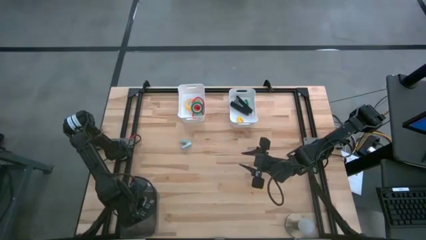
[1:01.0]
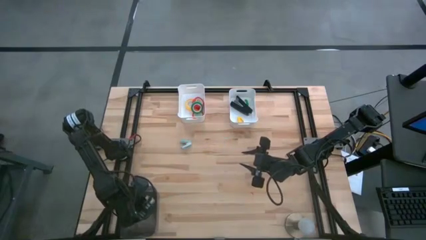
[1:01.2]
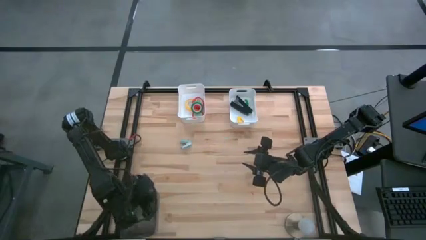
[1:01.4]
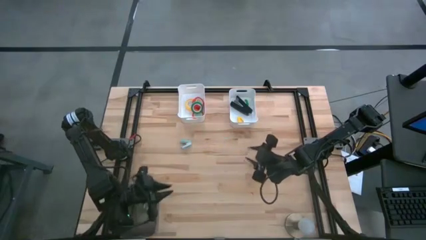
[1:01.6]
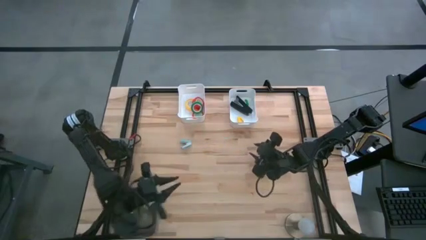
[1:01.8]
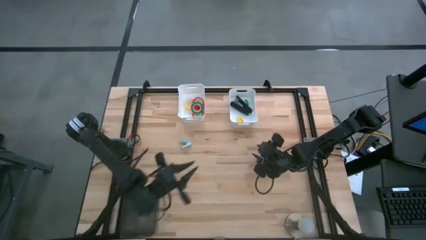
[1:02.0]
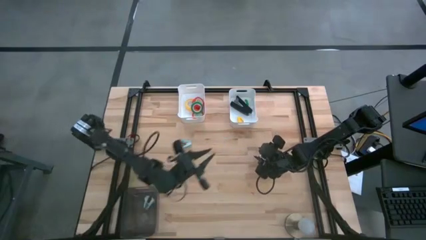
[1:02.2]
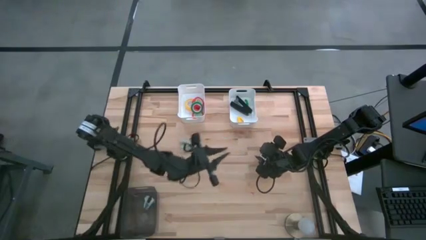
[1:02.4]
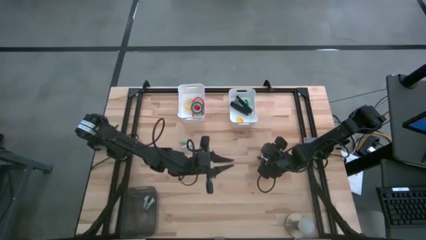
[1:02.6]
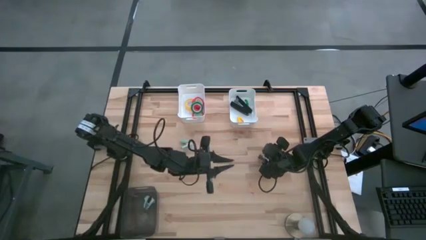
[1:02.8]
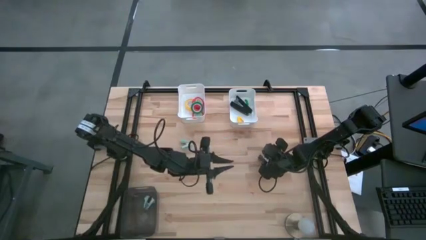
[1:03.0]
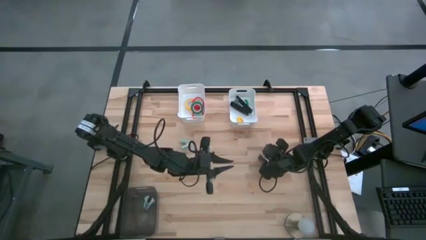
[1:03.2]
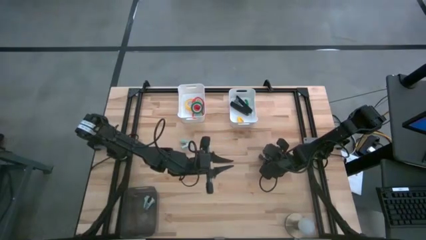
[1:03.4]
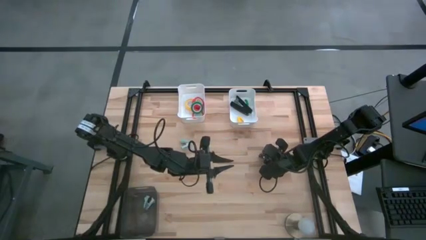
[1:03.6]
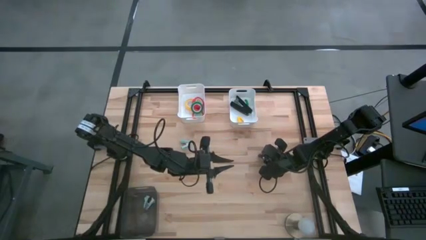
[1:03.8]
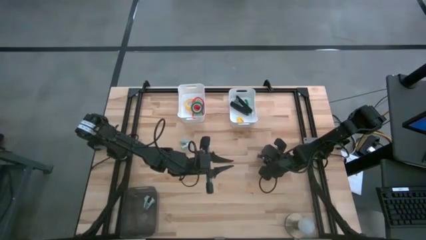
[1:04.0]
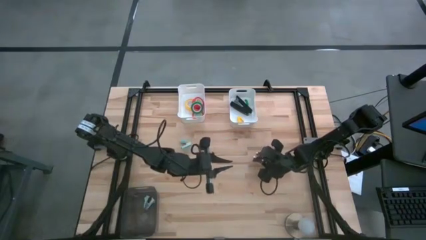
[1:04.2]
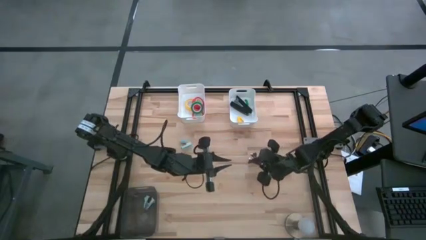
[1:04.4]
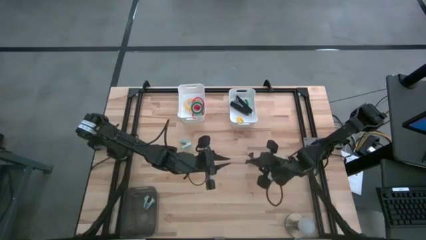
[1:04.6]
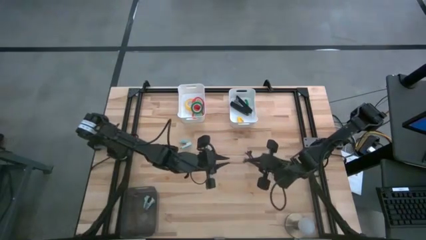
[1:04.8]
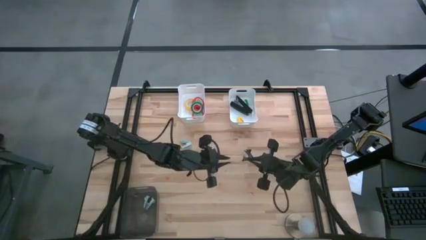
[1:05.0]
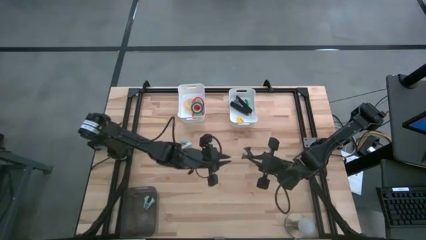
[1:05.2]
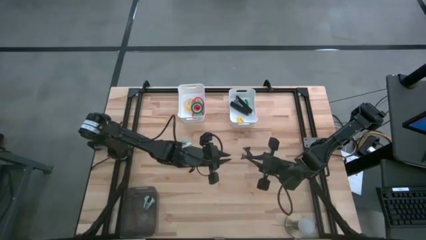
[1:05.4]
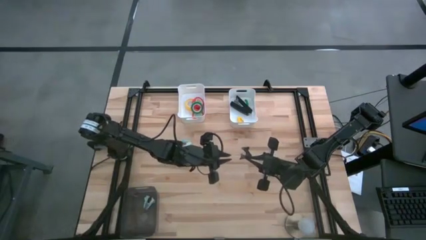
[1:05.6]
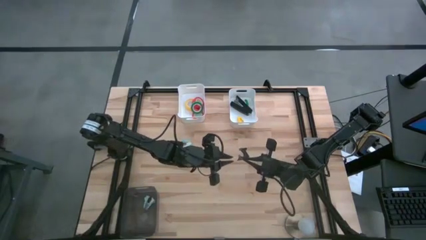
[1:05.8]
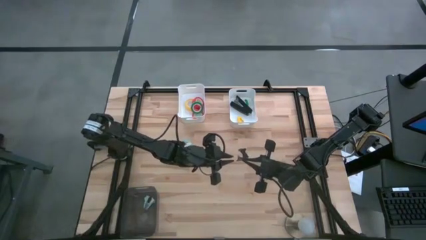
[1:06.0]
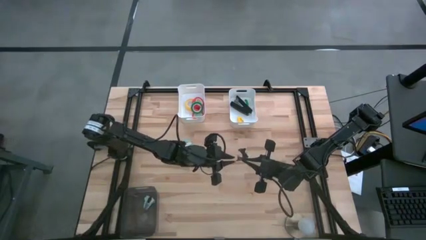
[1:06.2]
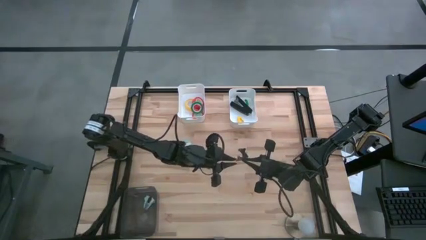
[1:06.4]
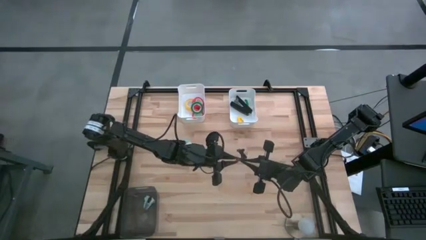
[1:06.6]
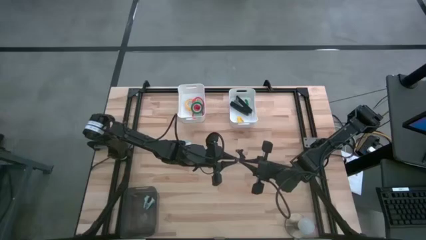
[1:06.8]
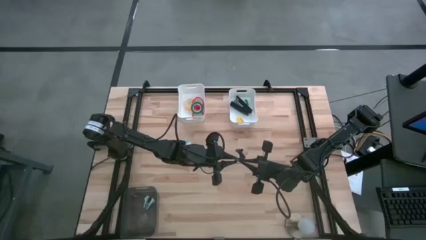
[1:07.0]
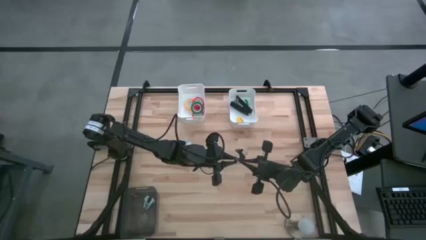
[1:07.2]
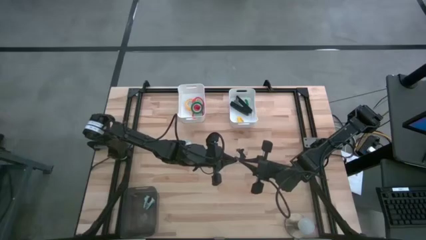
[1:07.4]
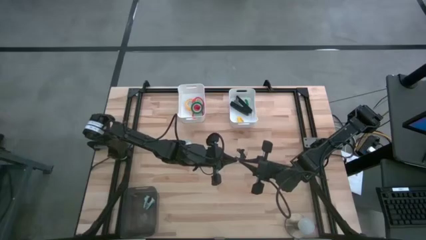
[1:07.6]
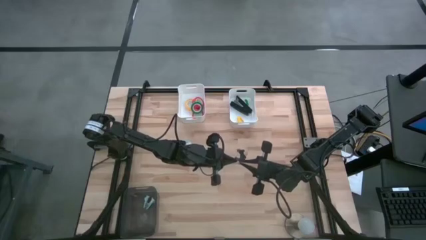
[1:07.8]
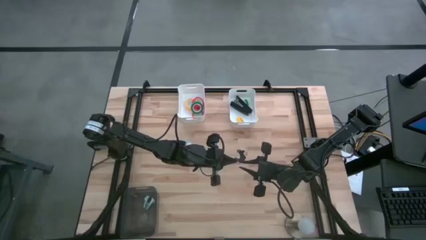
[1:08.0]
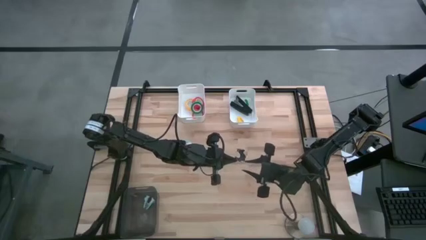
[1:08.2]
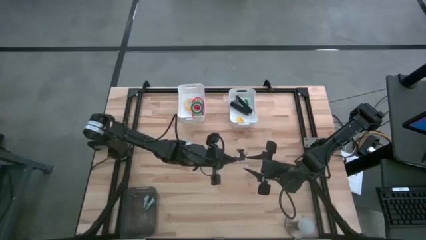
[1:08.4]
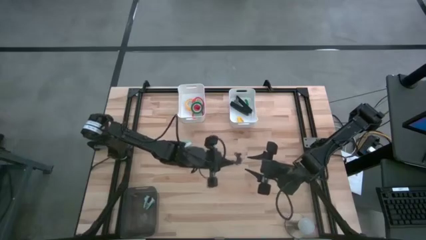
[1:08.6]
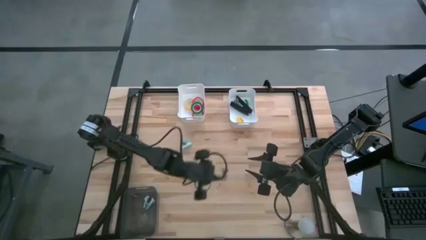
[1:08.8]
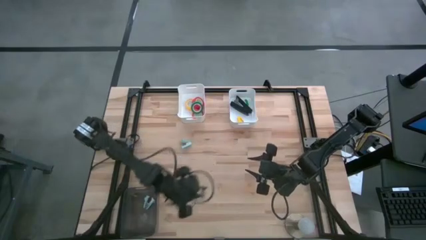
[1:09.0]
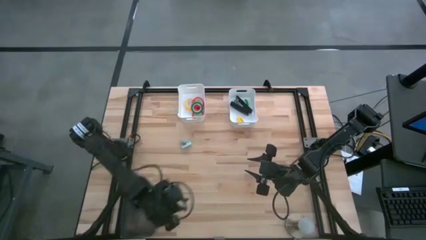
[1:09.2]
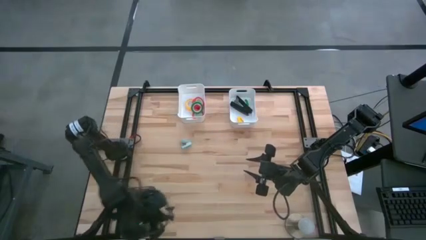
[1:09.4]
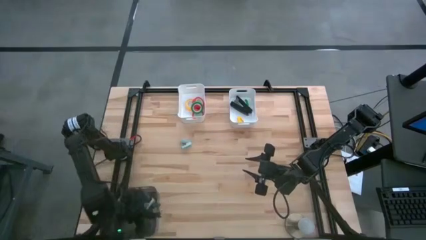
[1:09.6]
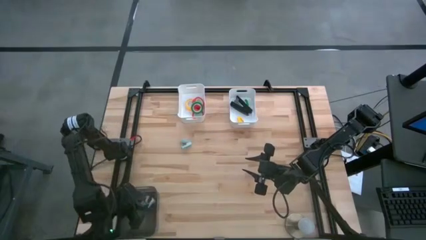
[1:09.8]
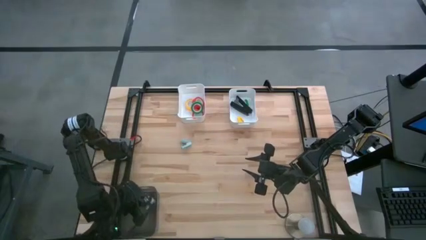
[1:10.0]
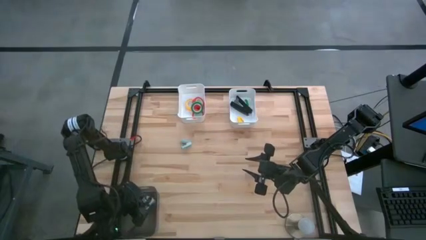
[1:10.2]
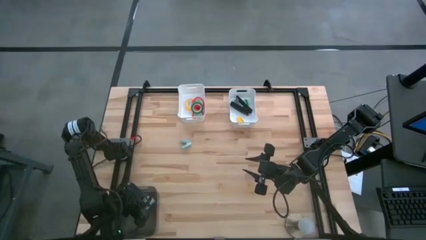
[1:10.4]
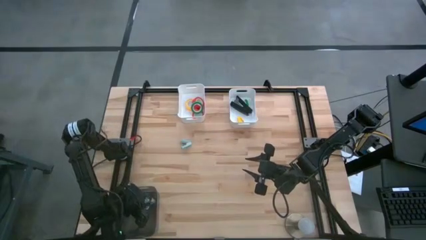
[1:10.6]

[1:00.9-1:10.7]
Task: Pick and place Stapler, Stapler remover, tape
Put the black staple remover into the black bin

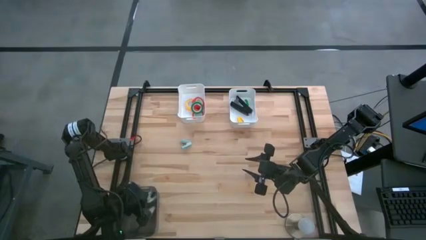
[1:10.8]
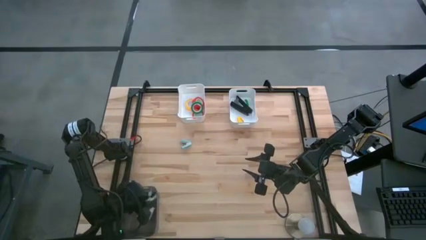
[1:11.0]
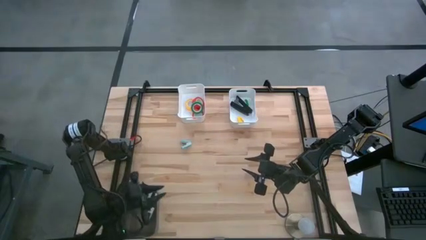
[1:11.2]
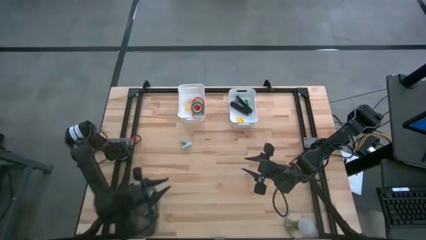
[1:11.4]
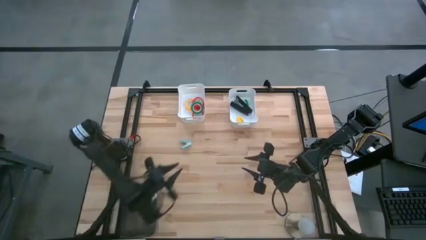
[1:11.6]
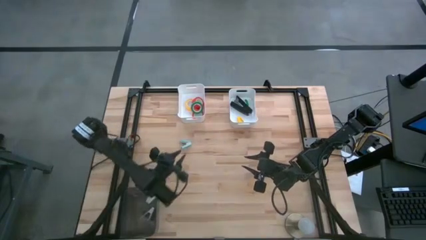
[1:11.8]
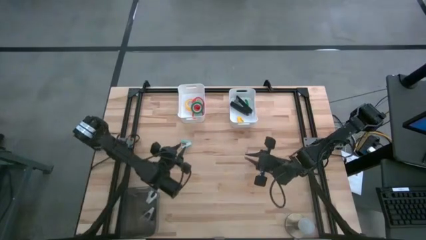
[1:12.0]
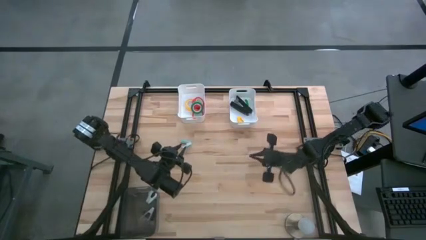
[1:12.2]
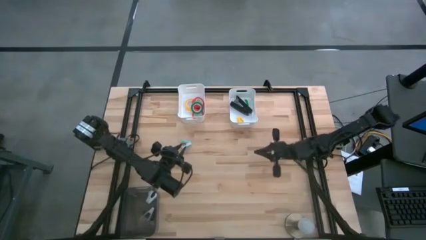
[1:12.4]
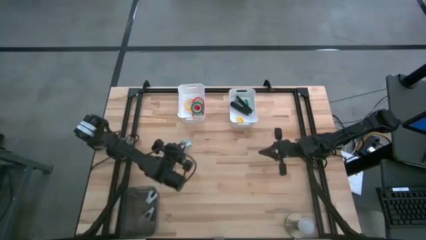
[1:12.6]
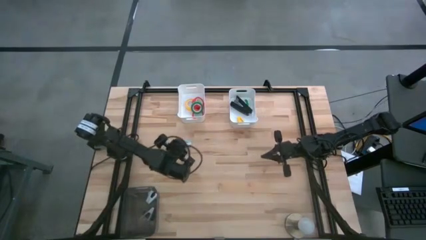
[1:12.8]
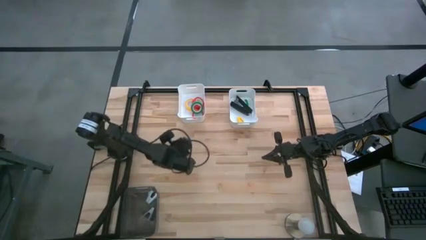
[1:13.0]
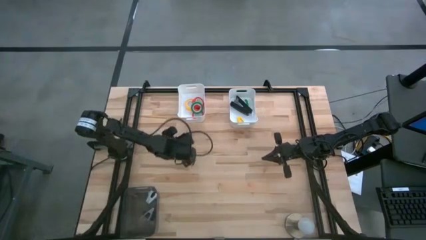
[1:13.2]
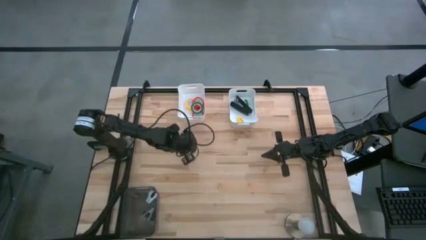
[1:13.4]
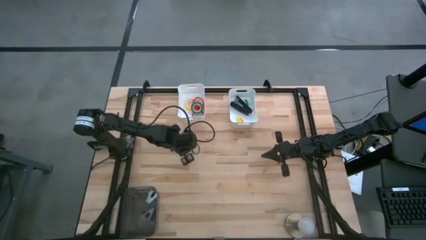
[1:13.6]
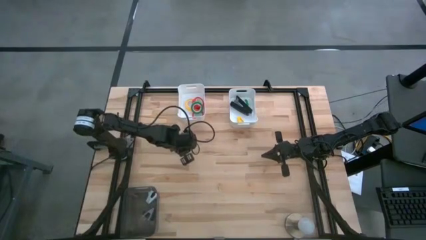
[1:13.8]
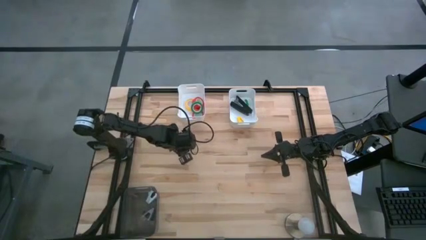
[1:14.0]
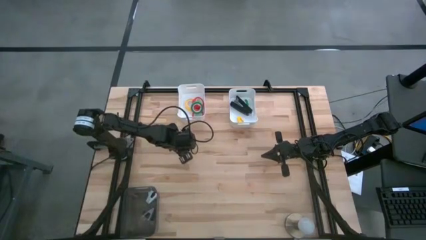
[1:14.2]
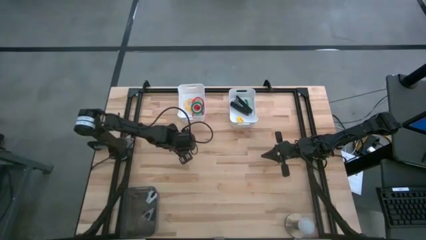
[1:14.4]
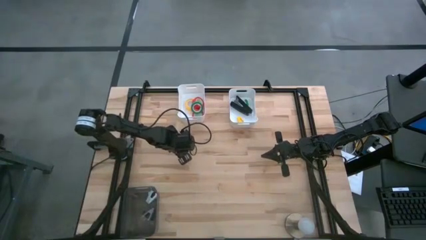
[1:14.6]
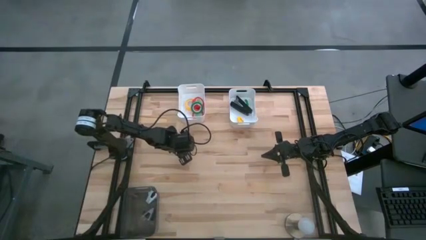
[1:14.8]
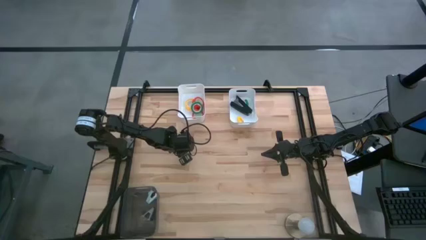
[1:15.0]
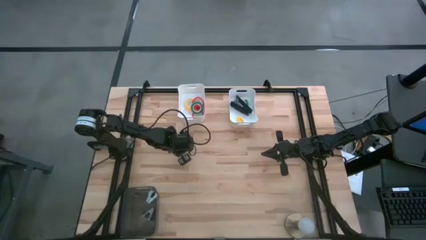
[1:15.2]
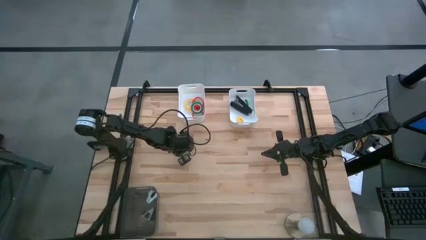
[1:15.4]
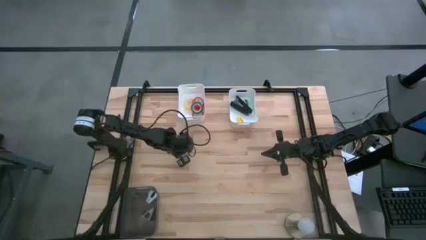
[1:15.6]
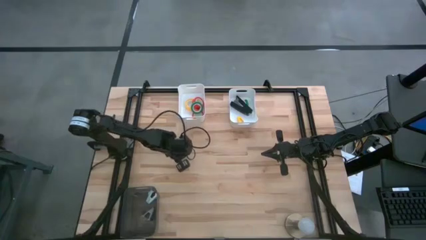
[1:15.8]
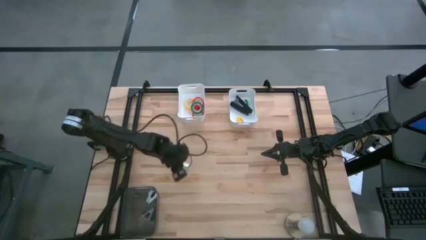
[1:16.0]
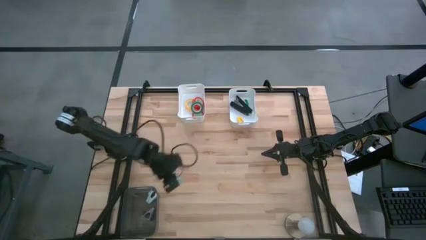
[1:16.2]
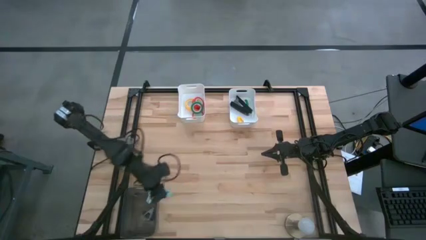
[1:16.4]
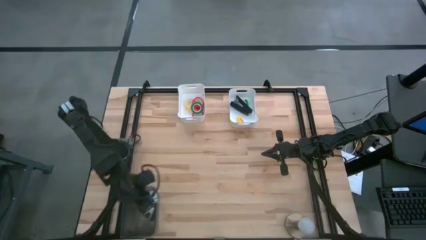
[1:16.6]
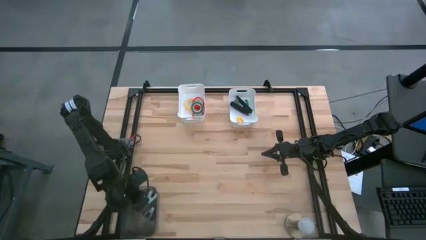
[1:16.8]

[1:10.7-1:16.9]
Put the blue staple remover into the black bin

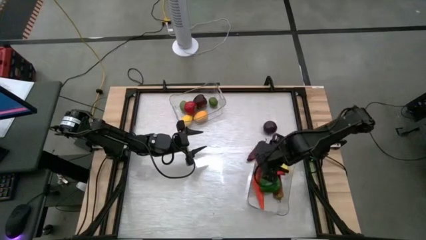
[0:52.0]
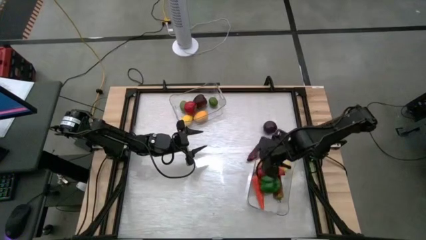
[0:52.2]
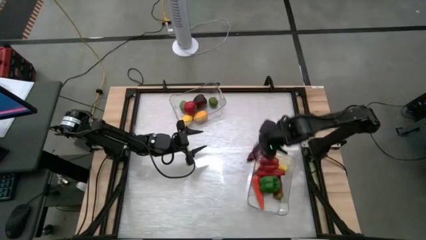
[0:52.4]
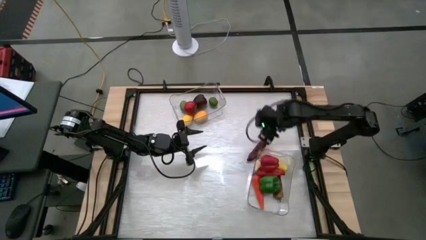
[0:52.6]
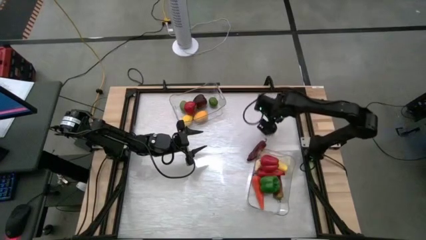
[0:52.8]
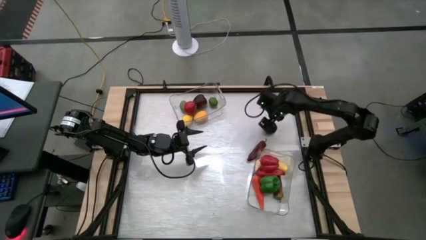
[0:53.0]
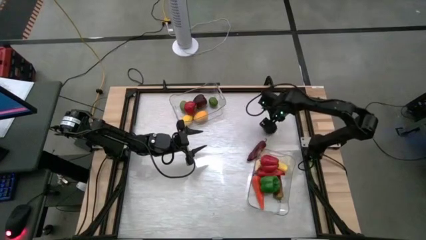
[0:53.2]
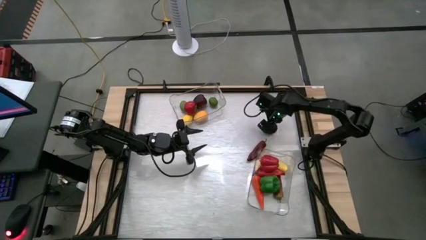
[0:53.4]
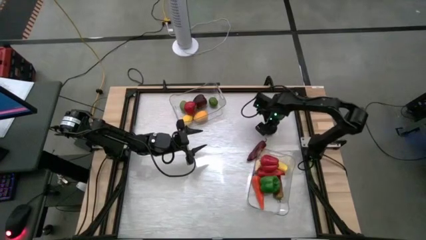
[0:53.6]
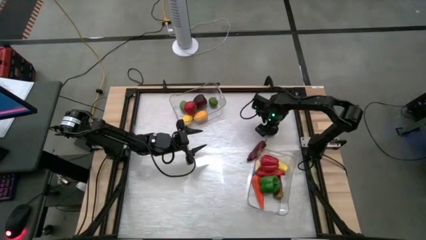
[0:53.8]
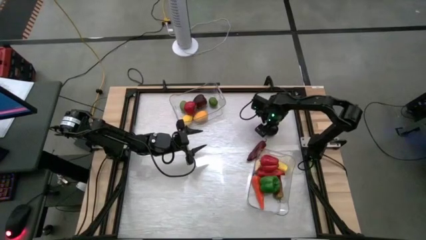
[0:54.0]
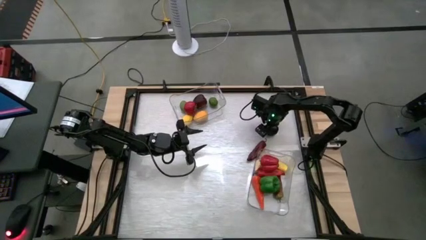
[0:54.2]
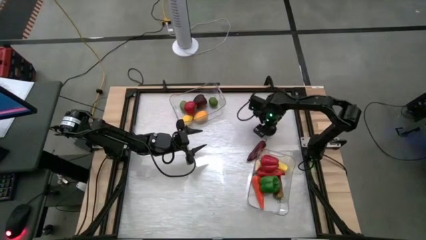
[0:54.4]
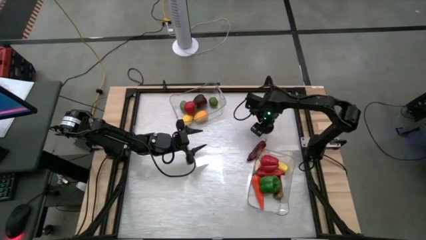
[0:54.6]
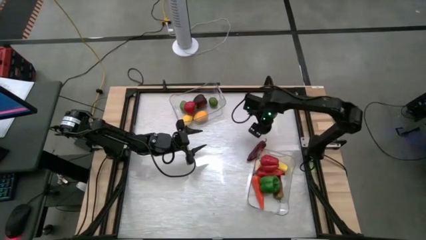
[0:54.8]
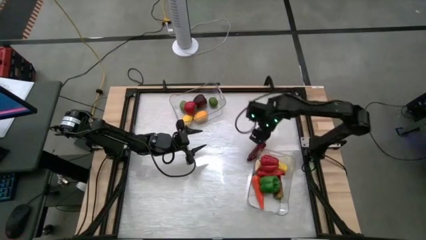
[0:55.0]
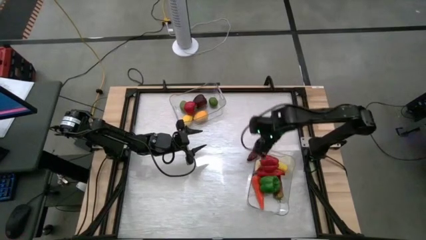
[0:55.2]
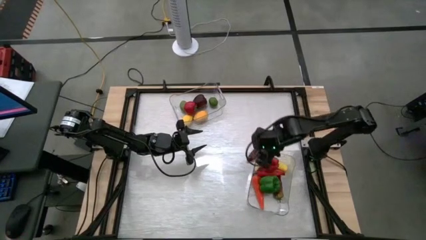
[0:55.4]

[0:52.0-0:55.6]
Task: Sort produce into baskets
Put the dark red apple into the bottom transparent bin
